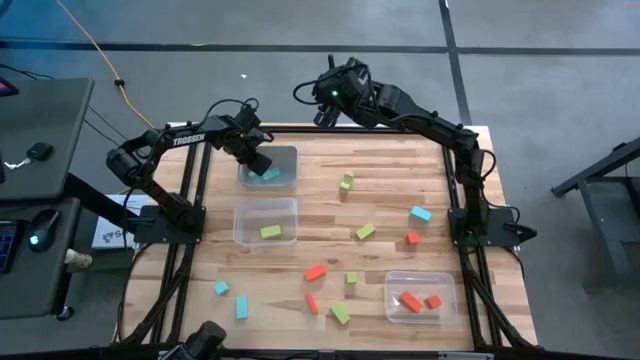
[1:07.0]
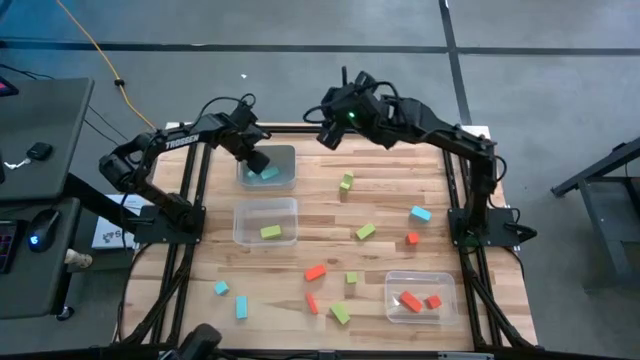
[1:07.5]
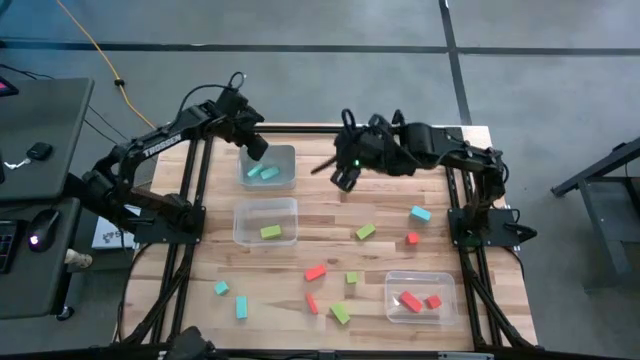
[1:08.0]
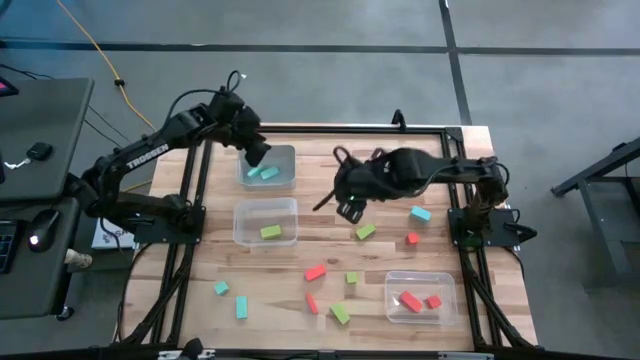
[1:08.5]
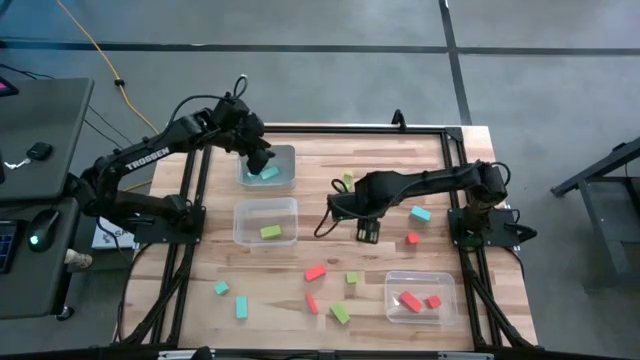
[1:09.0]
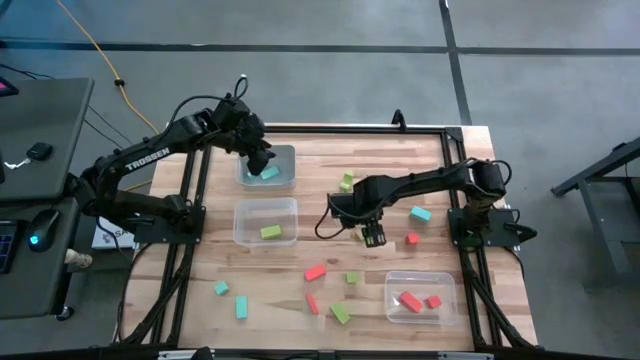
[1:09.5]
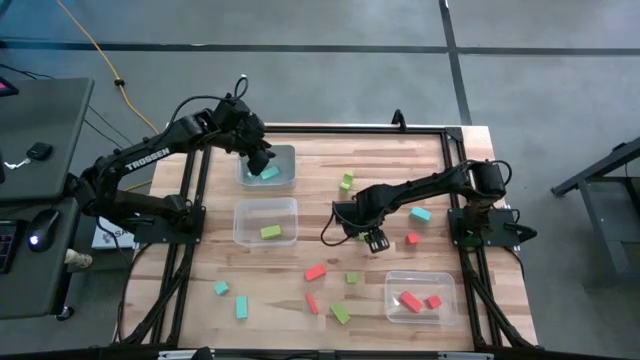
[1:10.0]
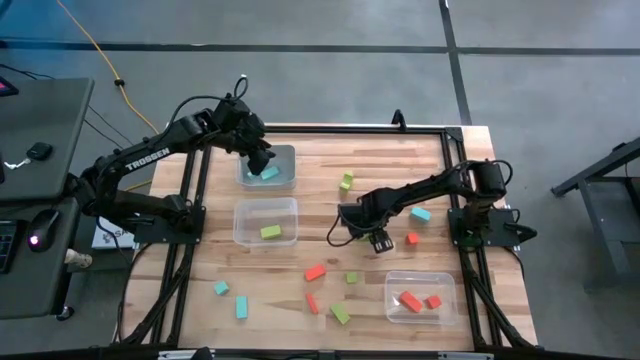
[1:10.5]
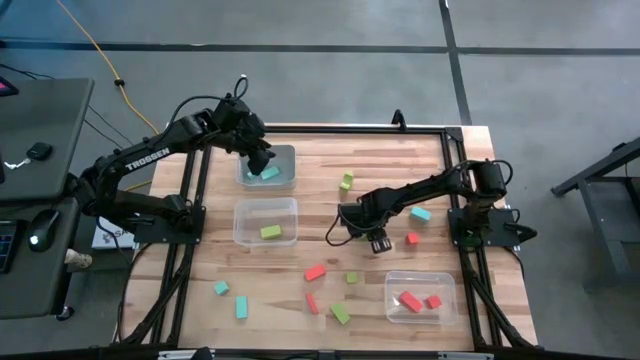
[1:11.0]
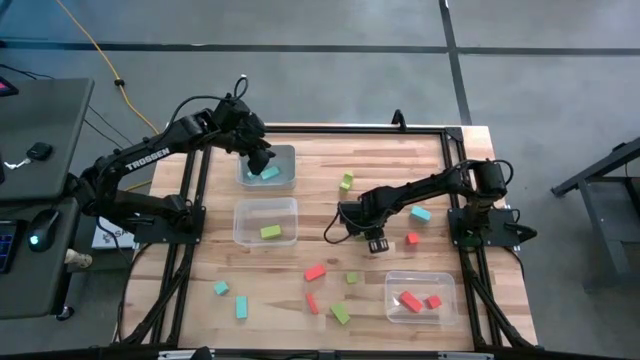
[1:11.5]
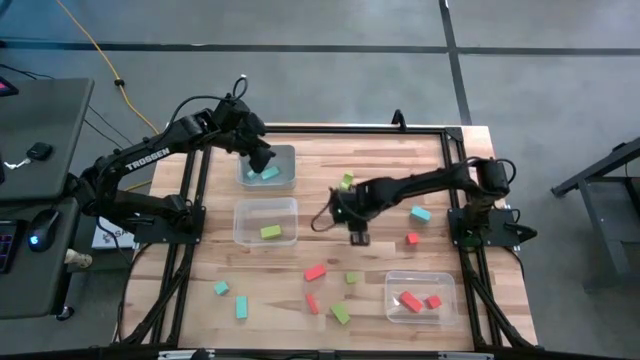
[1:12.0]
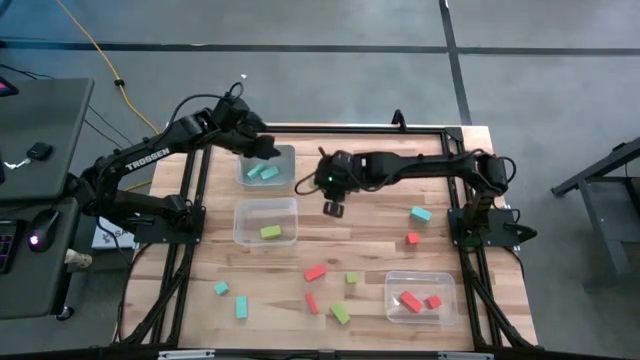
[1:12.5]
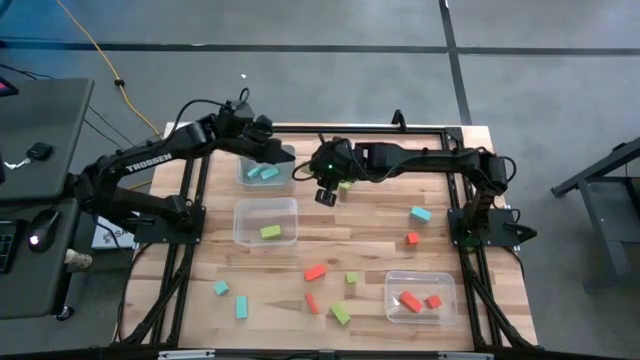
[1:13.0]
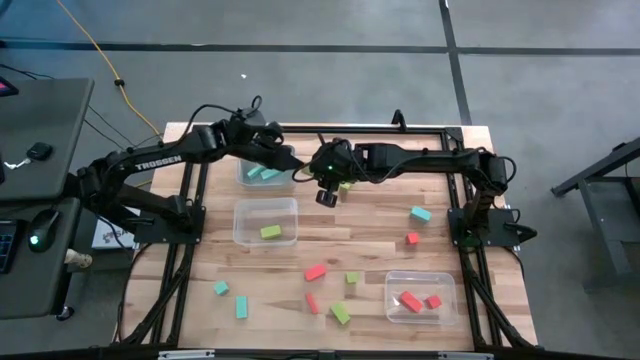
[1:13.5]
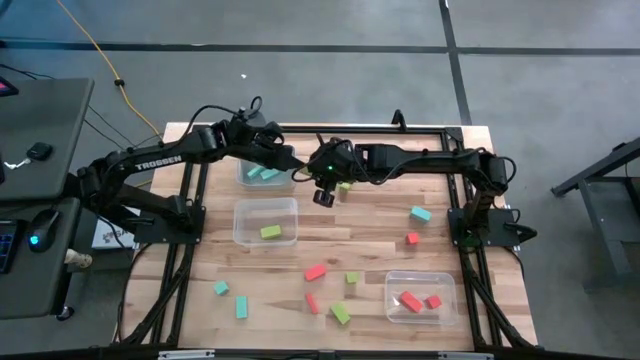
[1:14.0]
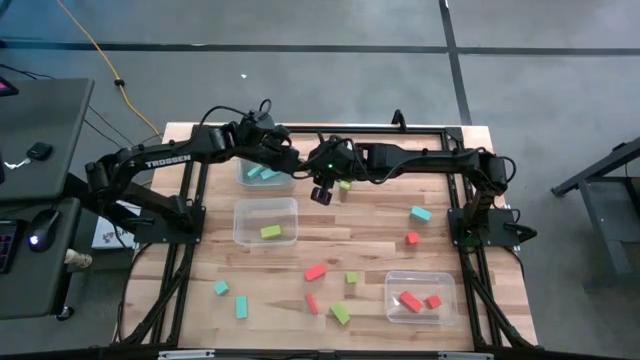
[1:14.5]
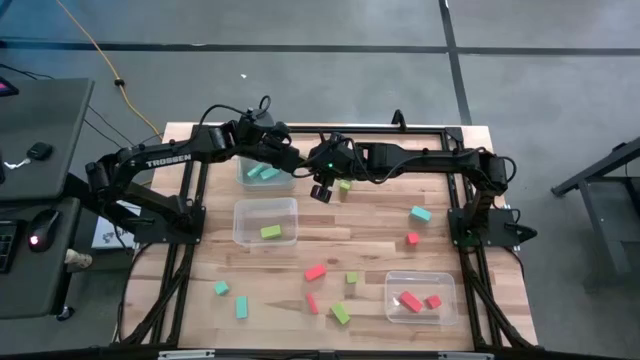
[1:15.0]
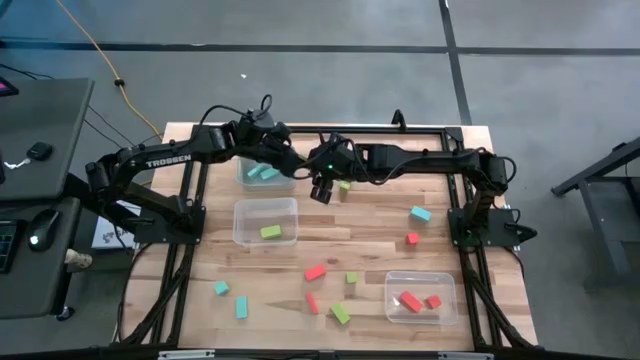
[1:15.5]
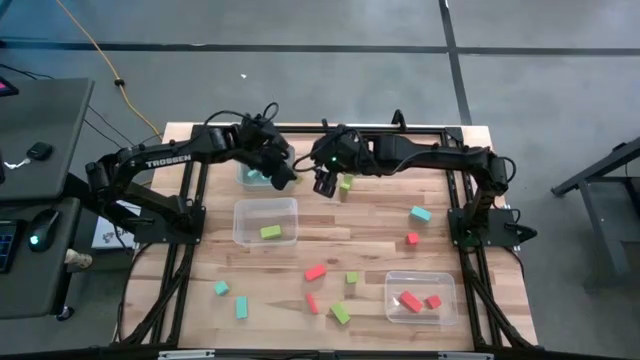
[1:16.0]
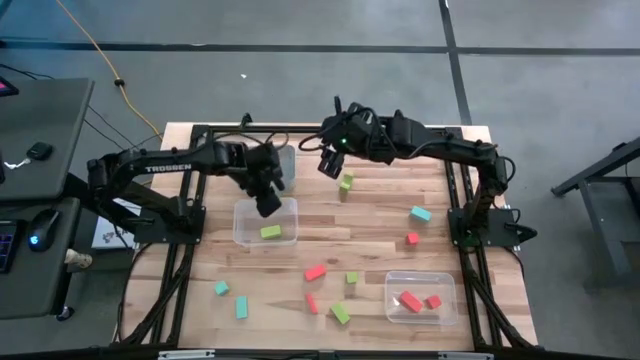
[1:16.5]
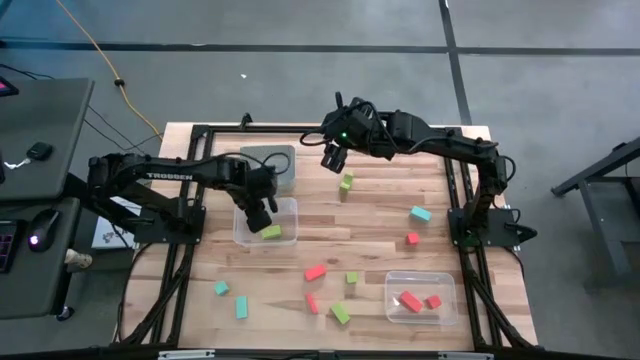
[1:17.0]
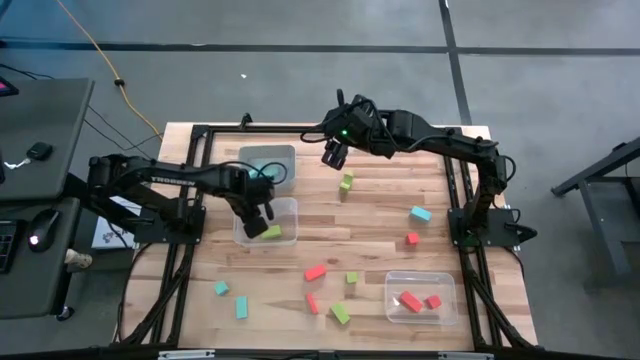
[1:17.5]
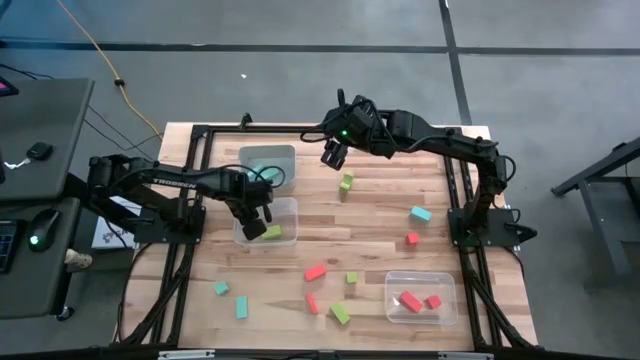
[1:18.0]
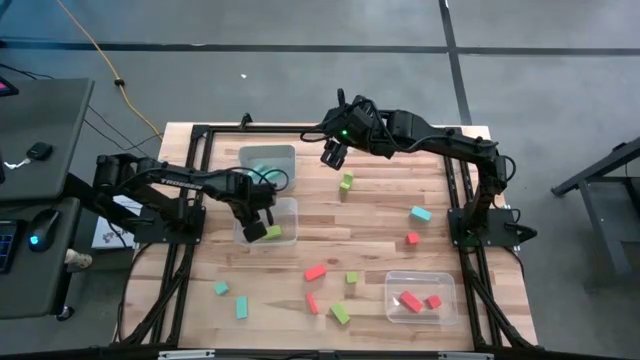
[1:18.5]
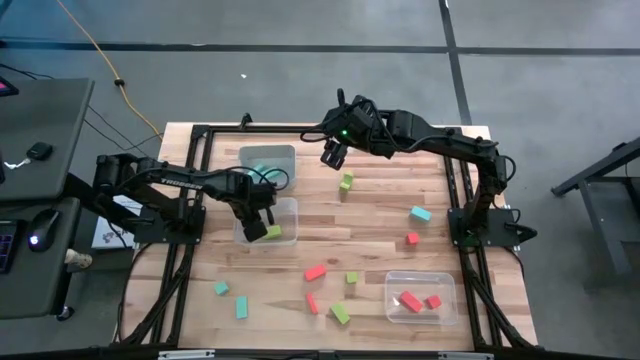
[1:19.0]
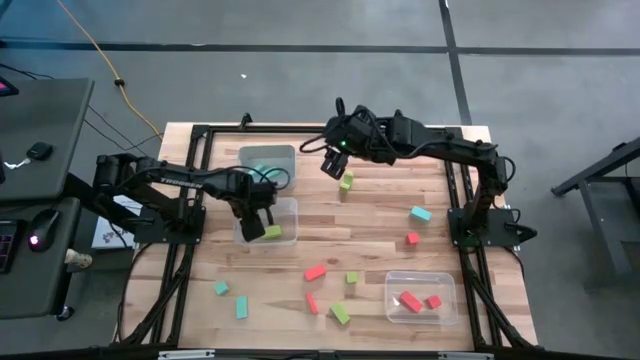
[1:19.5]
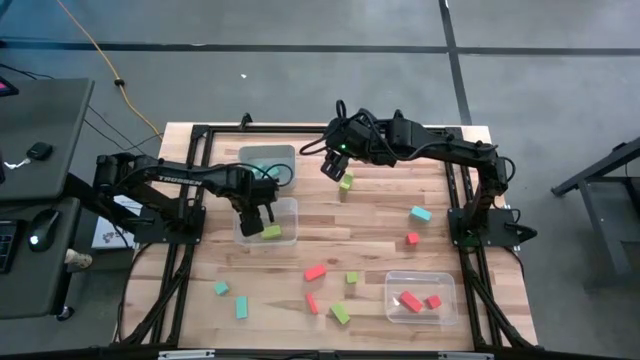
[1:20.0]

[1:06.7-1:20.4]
Task: Sort & place blocks by color
Put the green block into the left transparent bin

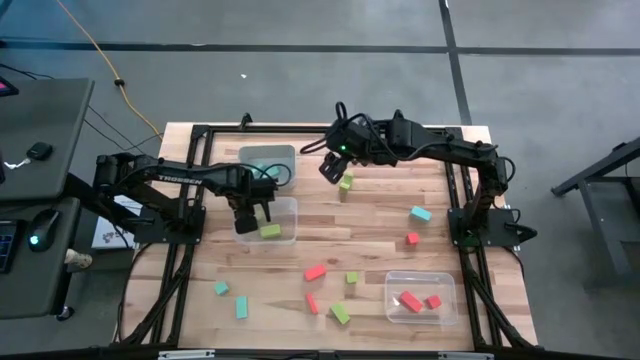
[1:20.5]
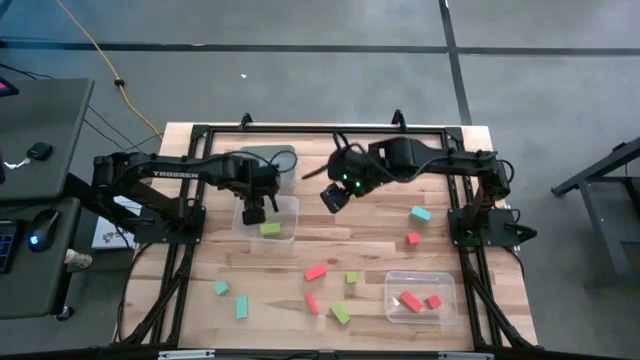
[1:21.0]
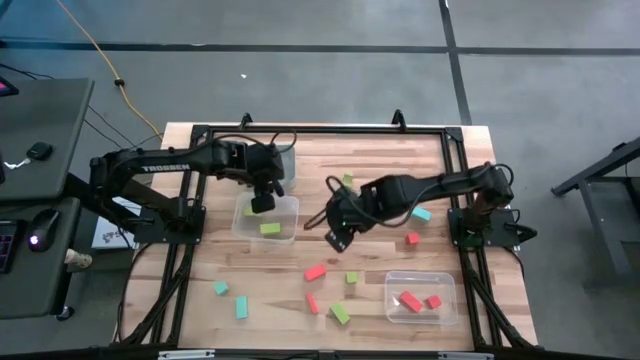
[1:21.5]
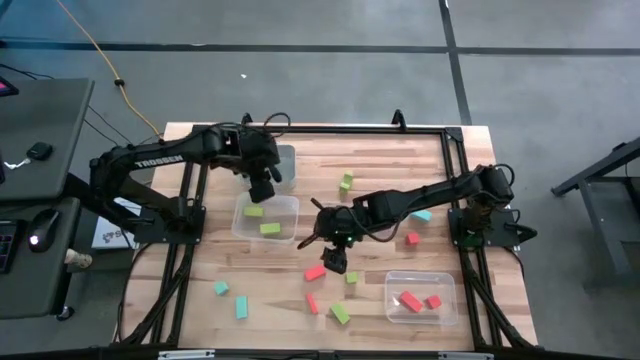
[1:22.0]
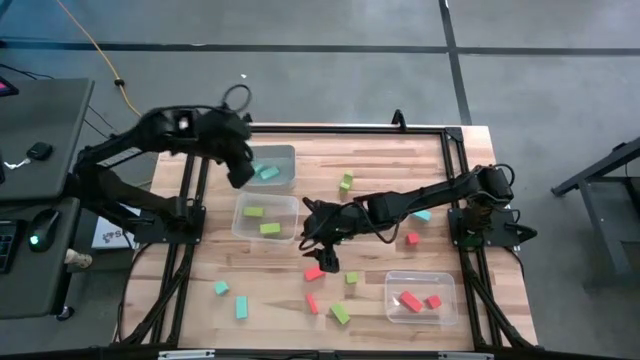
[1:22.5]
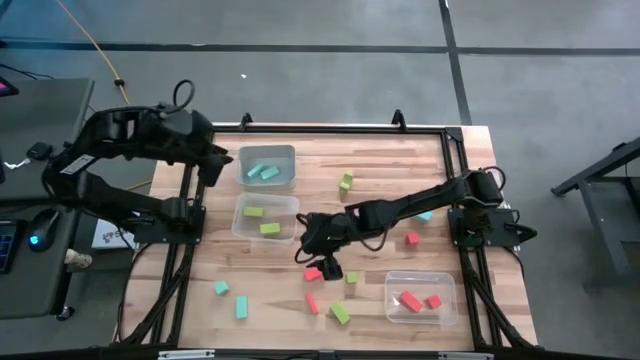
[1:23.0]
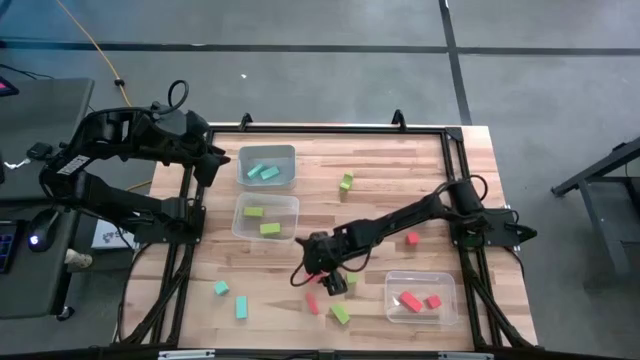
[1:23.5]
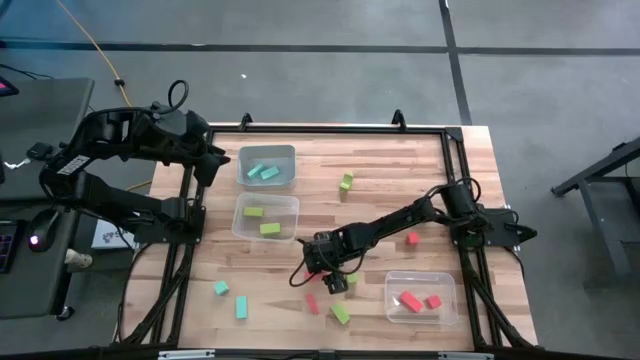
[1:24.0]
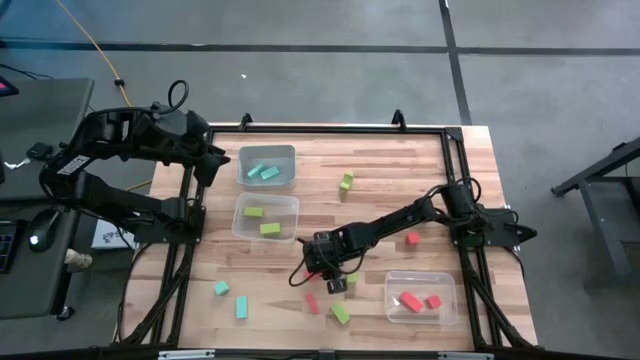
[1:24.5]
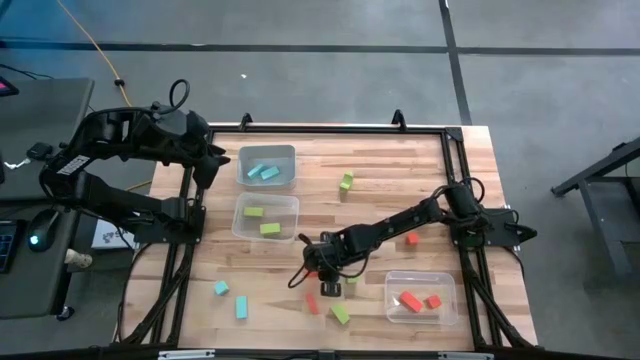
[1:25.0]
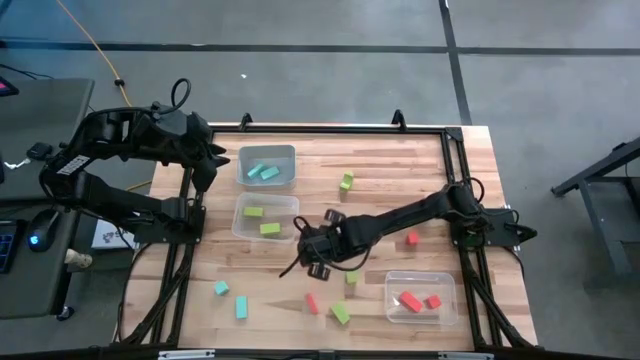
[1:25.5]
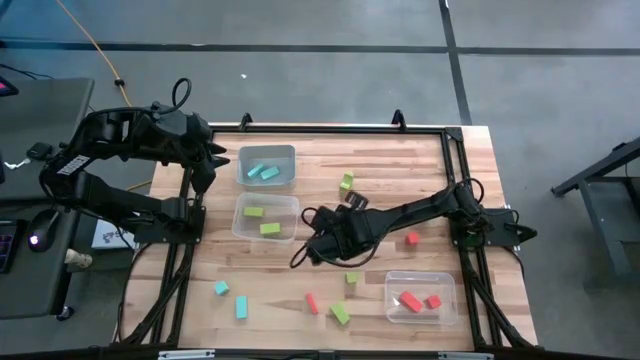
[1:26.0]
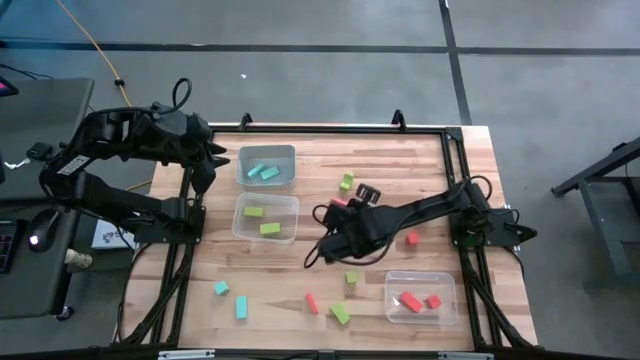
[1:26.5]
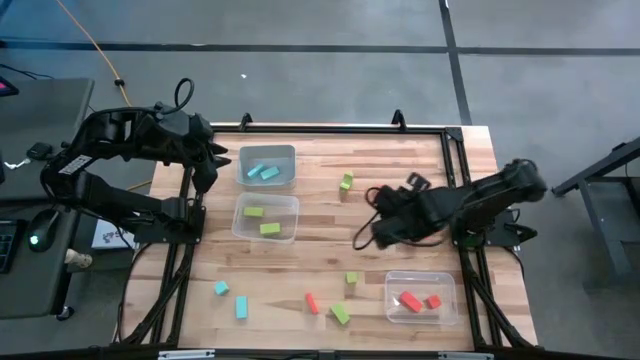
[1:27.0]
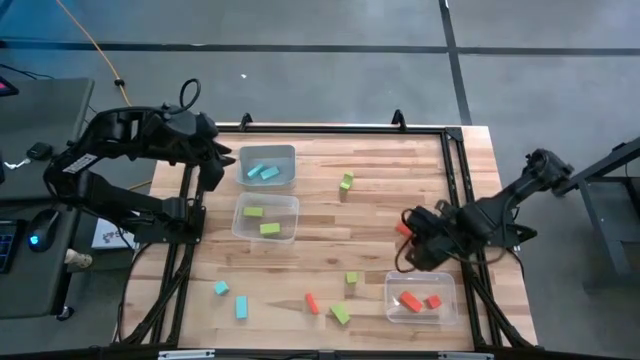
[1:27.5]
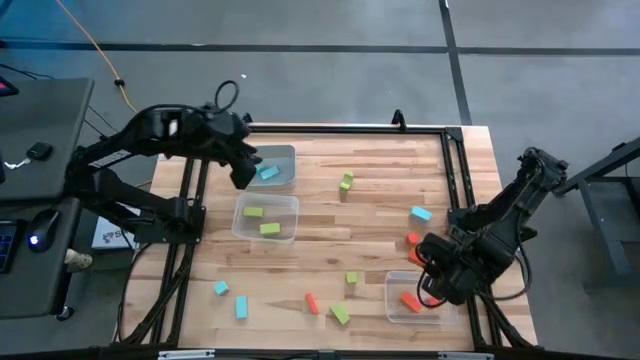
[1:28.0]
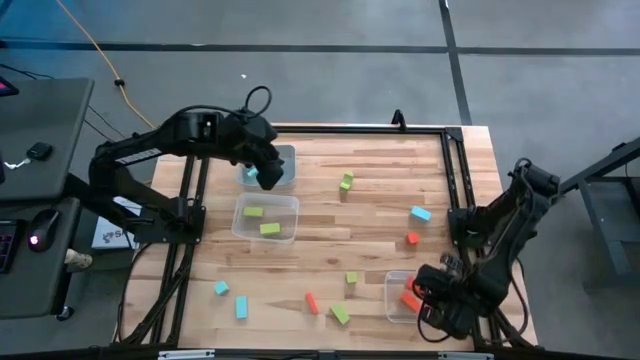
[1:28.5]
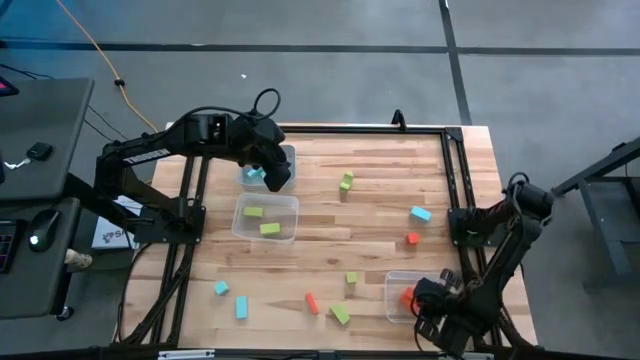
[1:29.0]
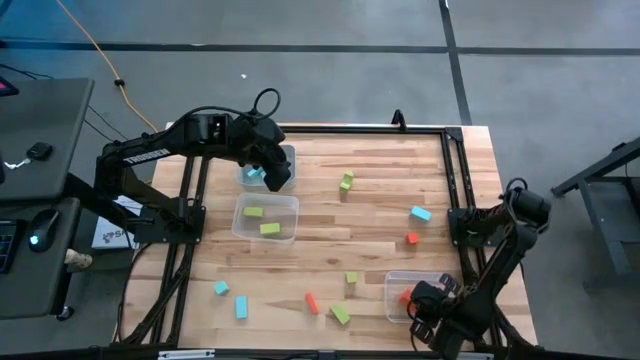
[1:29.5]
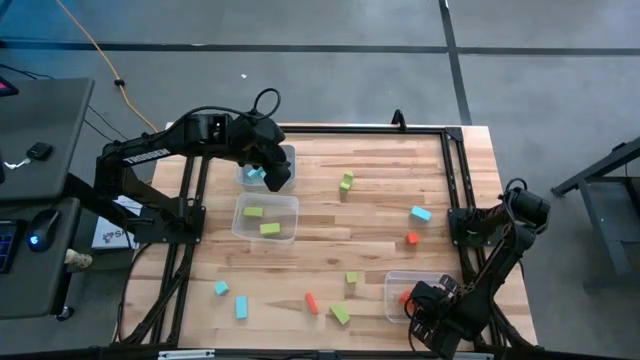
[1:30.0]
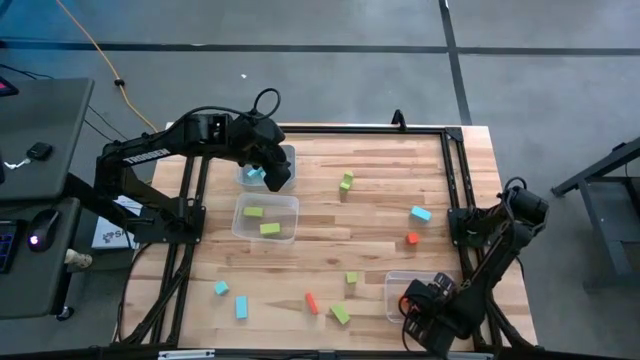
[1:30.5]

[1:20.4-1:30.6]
Put the orange block into the right transparent bin
